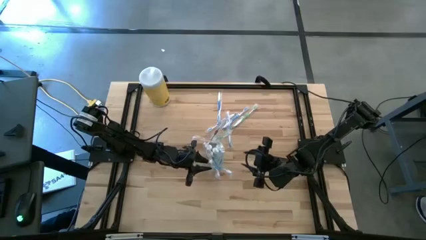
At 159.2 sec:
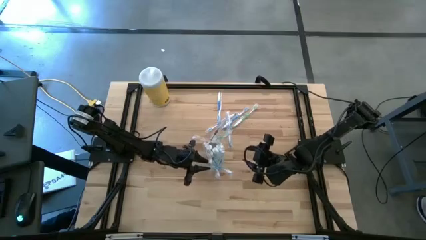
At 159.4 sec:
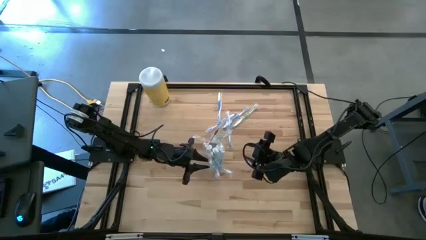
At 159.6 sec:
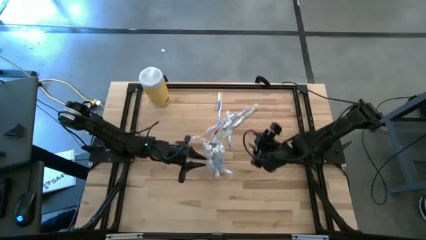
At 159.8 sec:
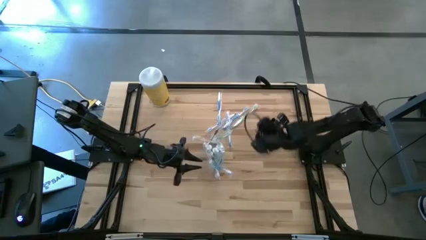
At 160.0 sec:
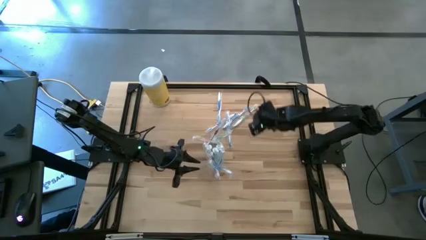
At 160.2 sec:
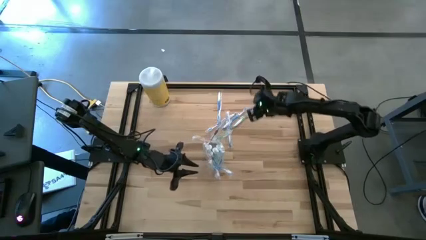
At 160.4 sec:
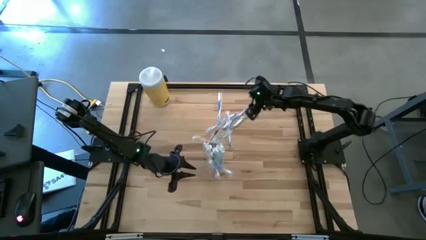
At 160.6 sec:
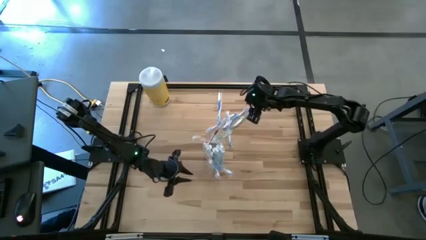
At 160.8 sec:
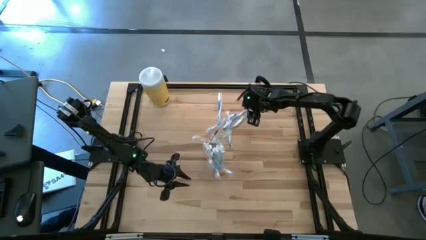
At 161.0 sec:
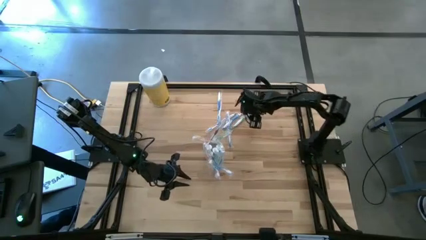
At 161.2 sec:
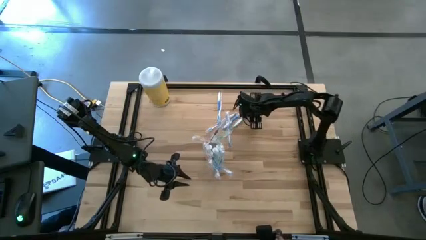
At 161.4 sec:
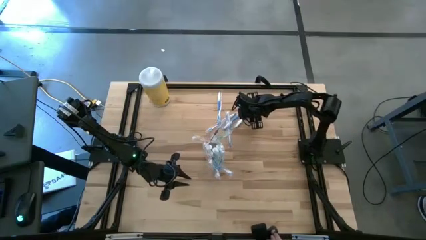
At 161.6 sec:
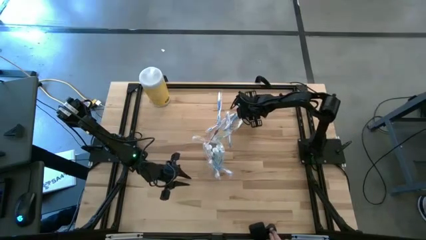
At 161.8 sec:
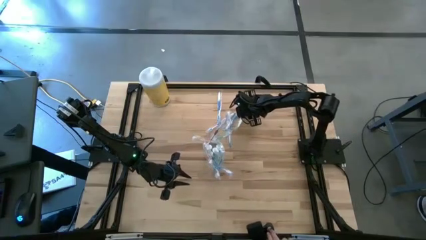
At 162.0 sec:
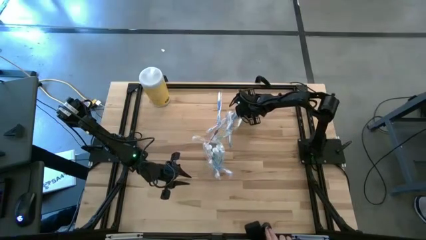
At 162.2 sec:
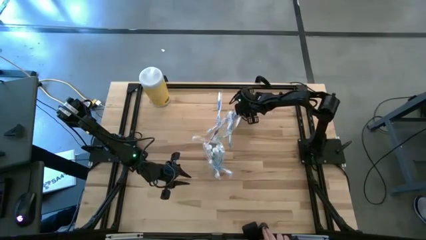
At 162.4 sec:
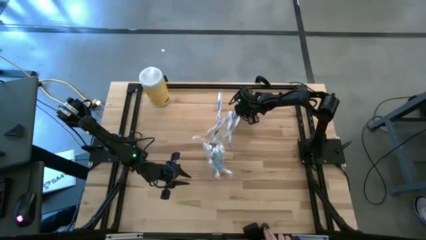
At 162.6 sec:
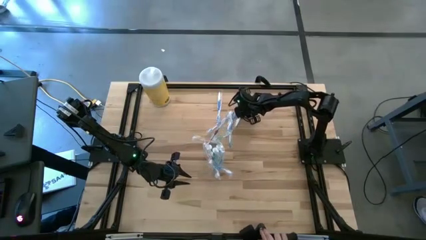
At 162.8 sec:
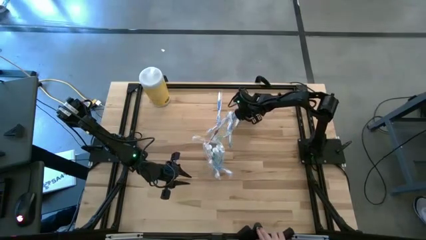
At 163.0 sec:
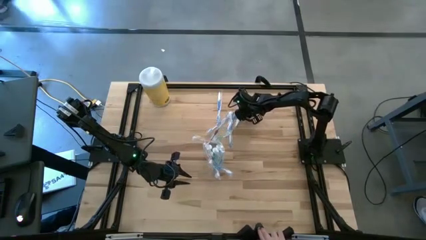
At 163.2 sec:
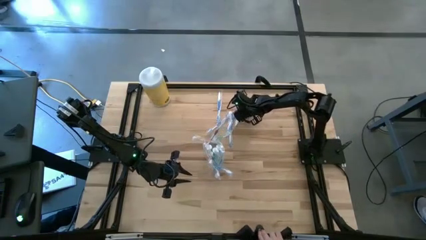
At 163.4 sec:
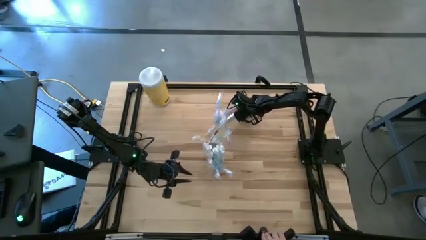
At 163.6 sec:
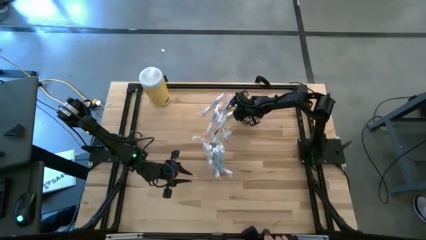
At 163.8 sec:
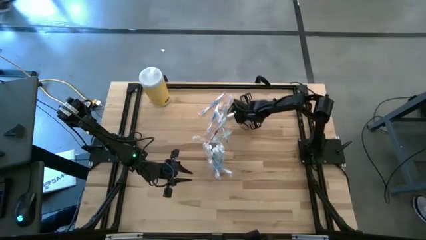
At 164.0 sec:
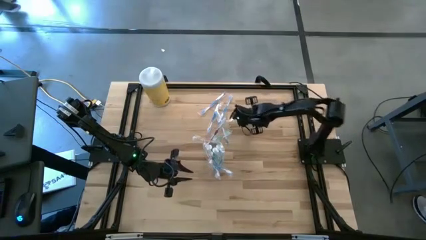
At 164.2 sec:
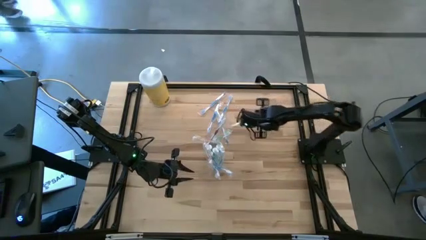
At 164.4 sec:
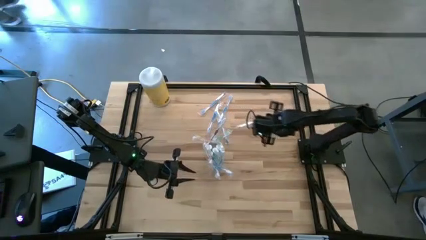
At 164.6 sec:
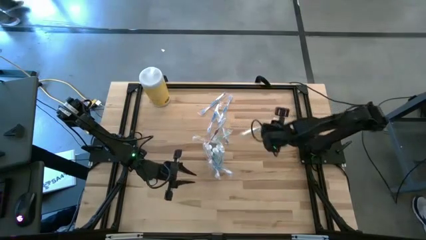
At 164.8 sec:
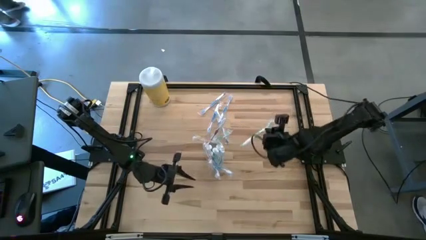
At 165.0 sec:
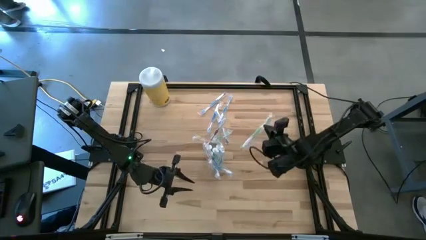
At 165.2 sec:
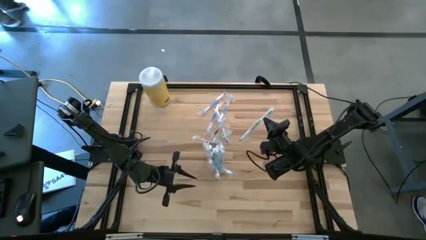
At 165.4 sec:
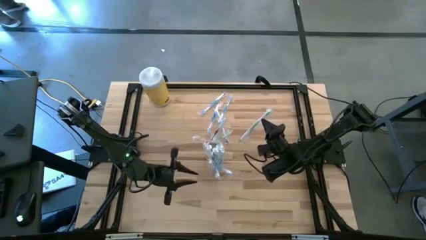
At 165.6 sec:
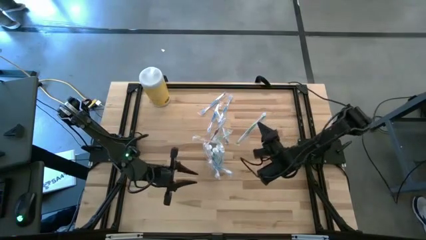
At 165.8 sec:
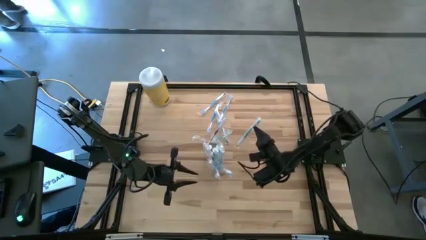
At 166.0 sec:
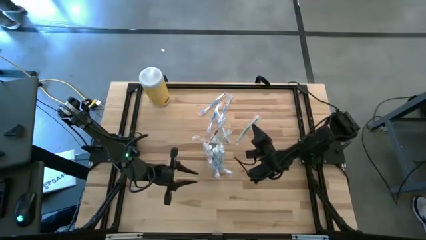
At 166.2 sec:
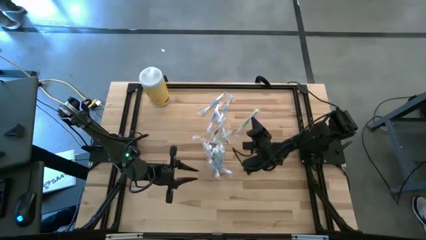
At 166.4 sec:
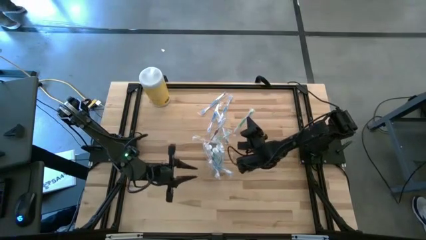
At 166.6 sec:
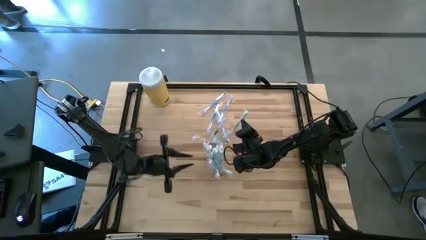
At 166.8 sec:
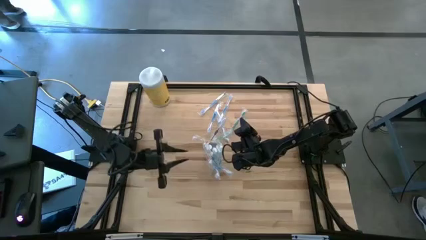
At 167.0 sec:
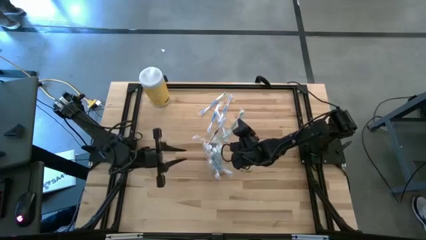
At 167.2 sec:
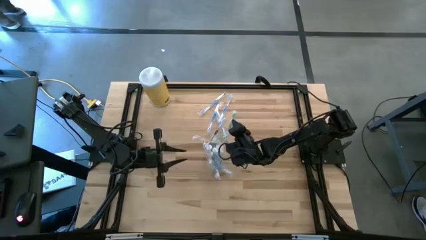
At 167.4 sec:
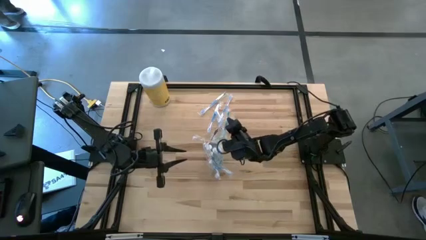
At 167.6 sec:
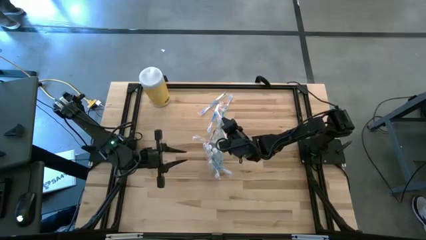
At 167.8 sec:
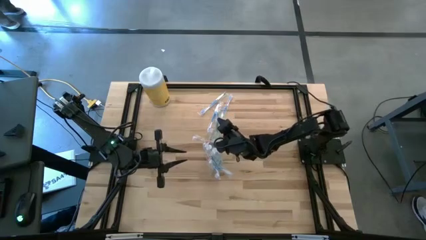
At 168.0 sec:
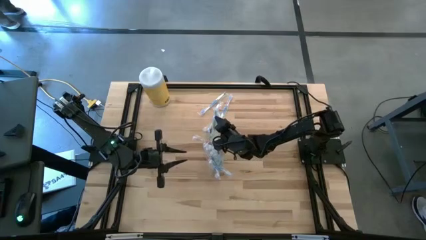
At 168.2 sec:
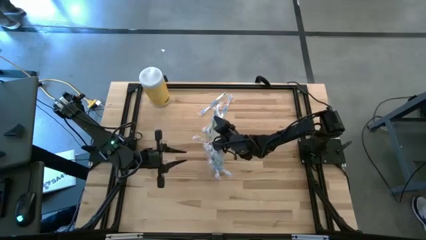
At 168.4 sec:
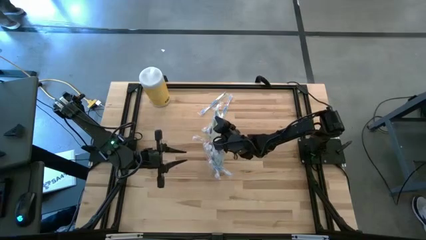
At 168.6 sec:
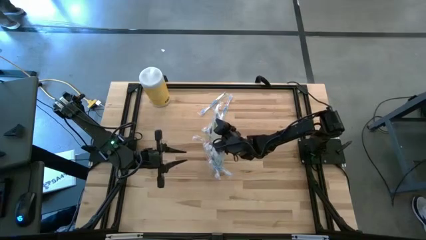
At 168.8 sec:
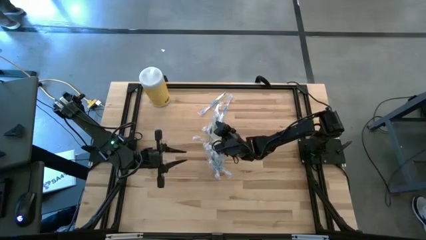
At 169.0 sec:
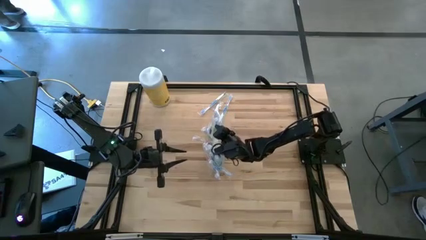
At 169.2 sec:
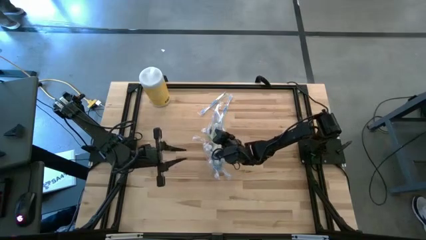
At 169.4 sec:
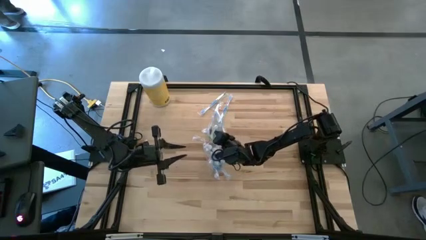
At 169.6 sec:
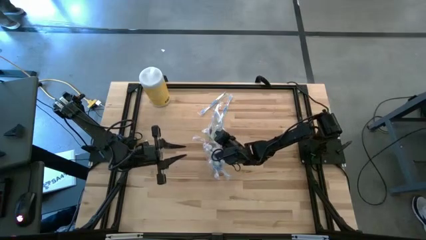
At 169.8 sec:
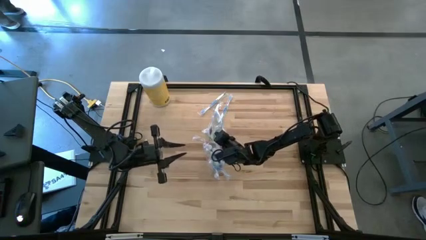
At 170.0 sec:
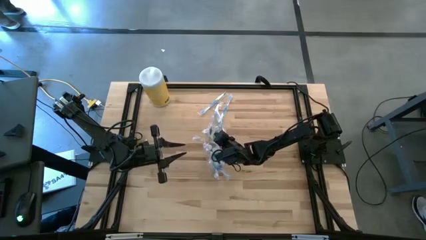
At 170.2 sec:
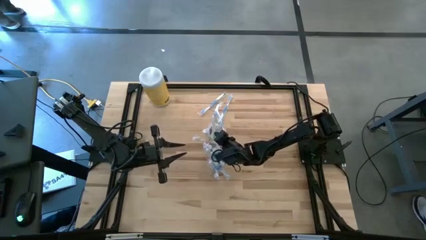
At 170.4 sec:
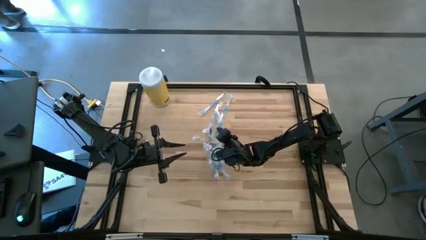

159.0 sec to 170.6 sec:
Task: Pick & Place toothbrushing station
Put the green toothbrush into the transparent organizer
